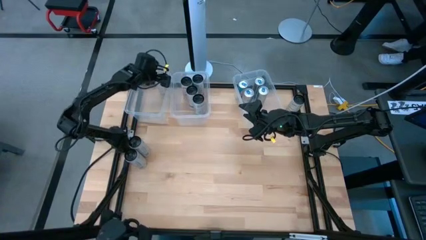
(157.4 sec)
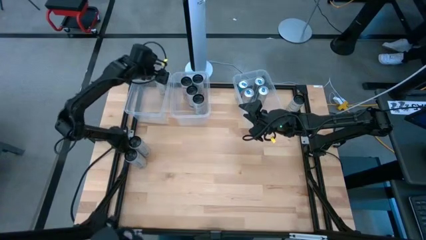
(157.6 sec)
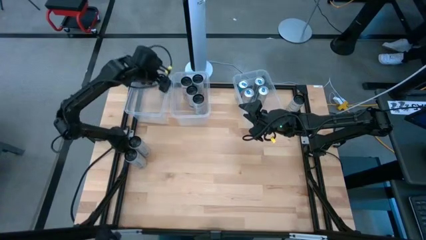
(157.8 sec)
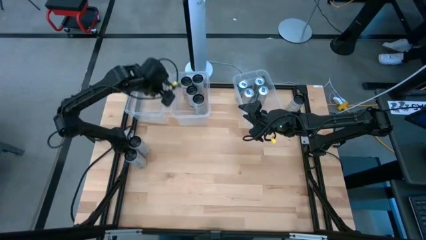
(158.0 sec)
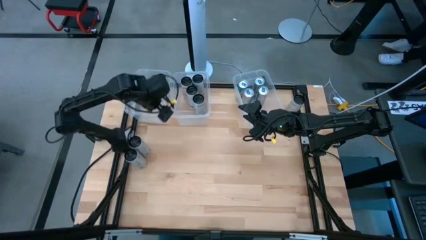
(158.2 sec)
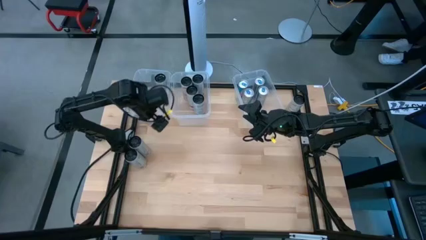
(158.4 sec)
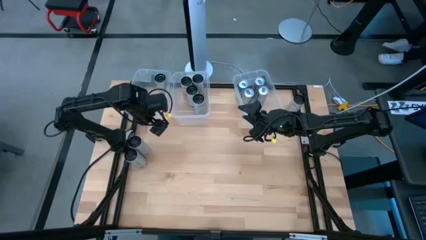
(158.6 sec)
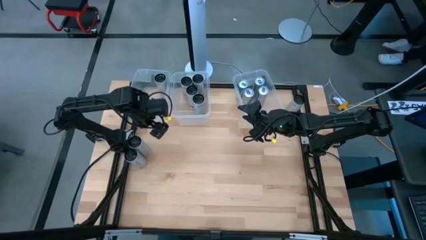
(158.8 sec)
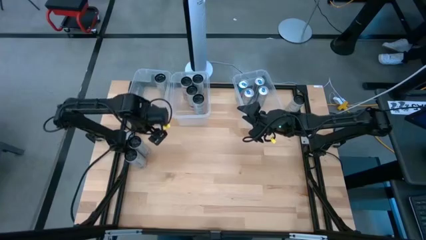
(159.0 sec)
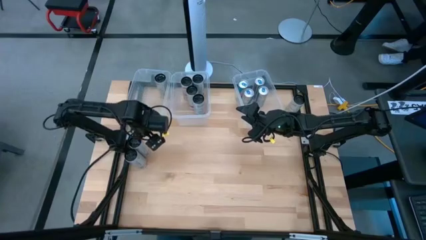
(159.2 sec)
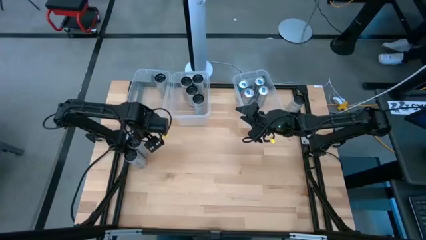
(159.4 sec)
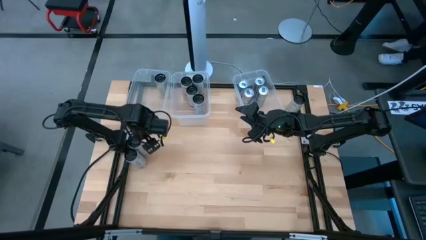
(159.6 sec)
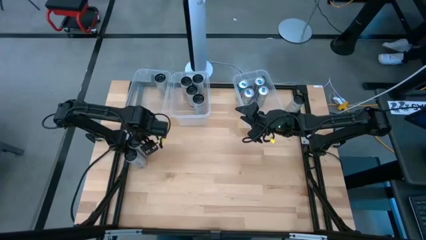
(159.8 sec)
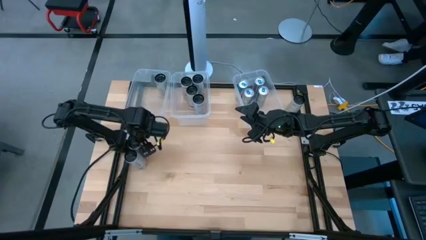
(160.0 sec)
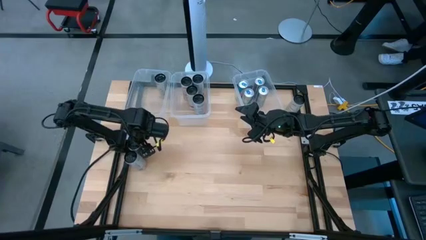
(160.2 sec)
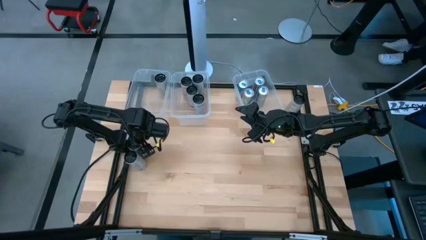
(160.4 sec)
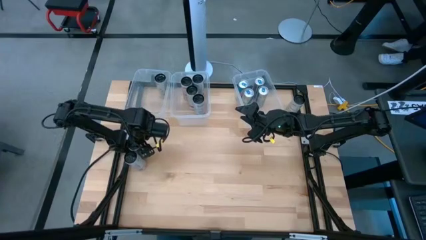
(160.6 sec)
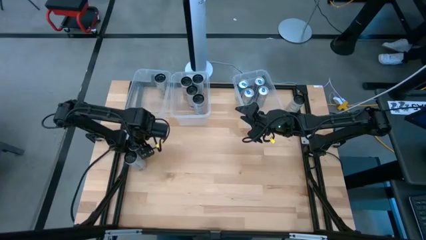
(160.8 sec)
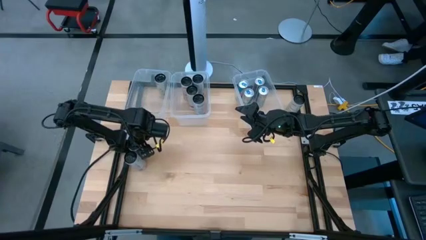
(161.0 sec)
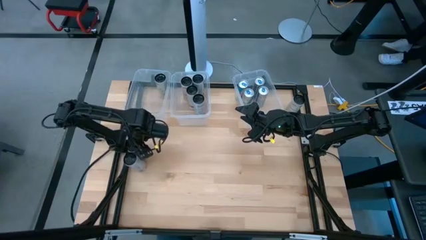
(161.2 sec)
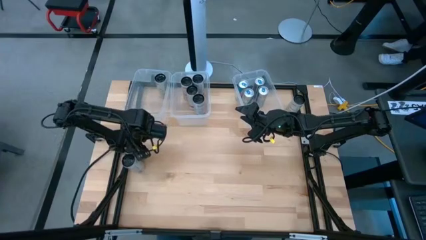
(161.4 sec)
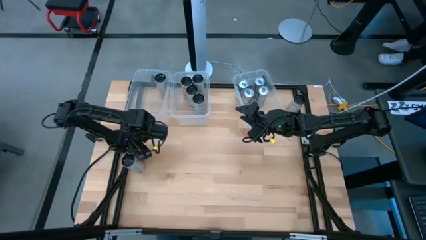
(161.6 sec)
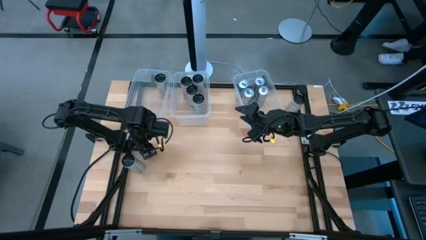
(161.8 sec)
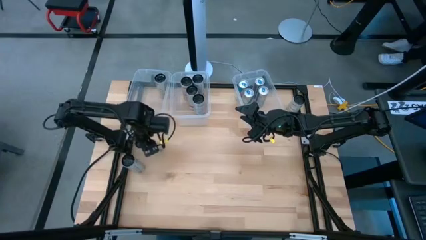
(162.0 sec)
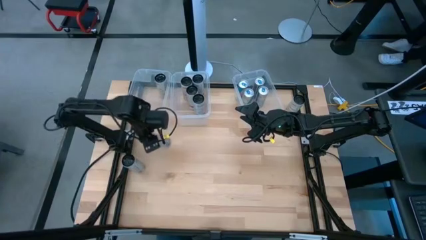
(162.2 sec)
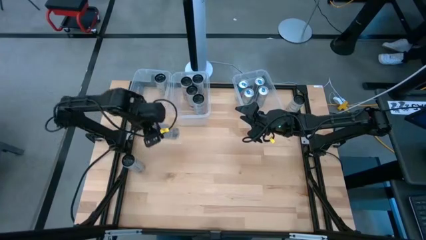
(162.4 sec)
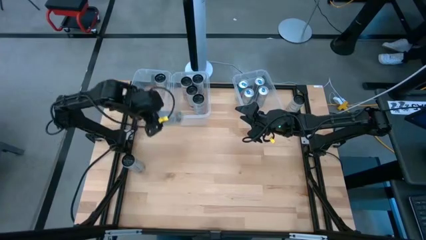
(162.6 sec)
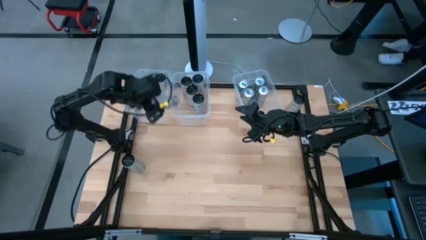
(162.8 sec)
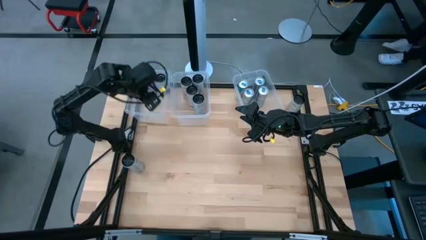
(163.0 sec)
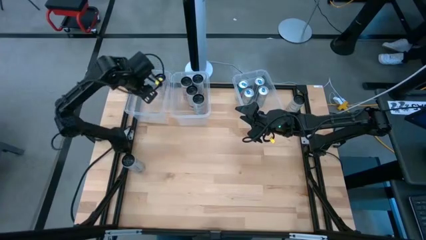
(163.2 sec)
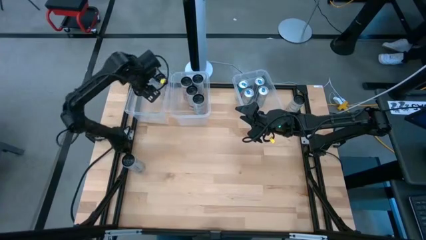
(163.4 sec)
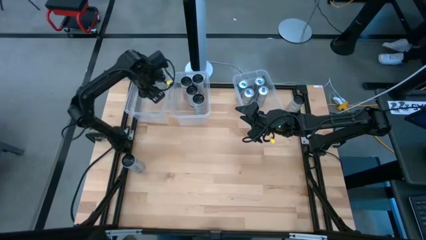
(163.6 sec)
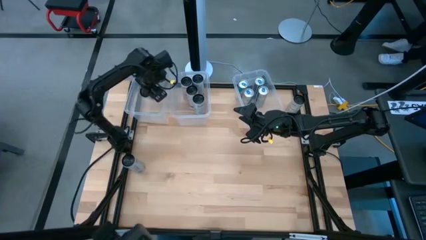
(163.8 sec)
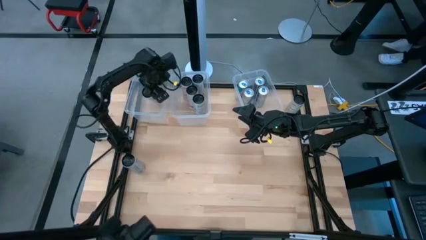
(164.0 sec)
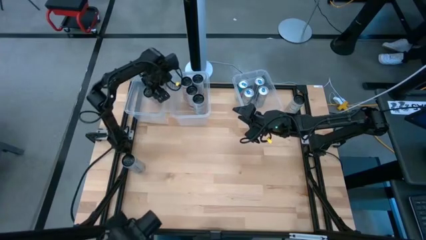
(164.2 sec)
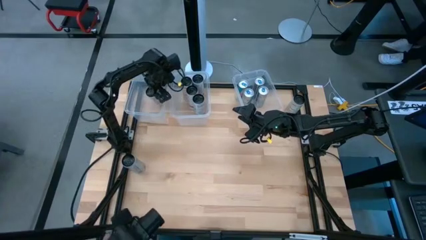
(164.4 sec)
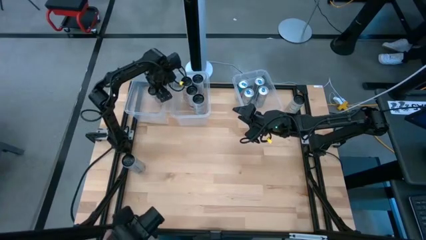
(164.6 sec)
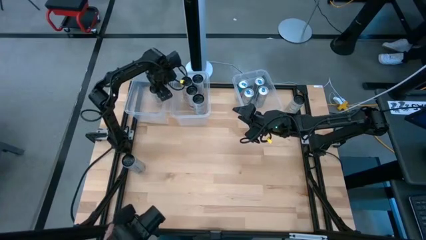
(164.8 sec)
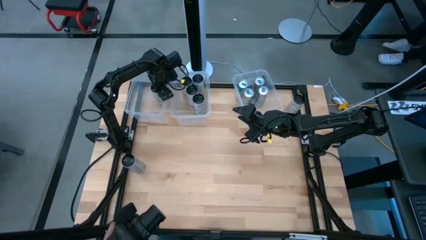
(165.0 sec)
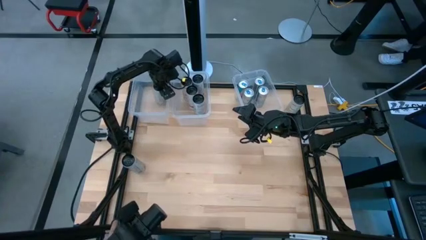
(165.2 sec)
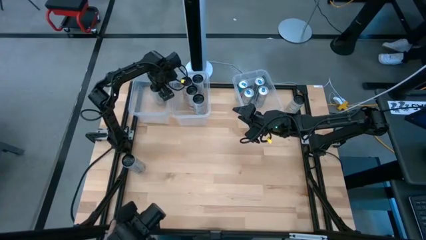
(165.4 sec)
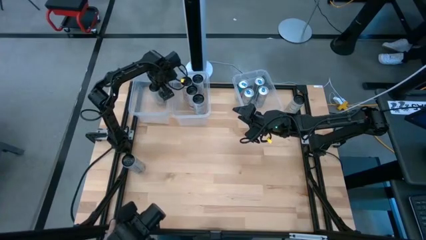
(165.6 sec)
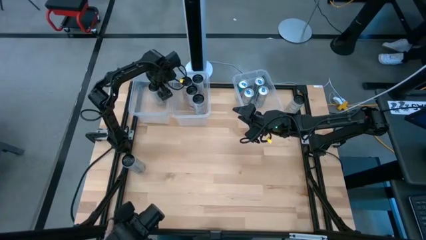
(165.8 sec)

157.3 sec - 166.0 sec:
Task: Sort soda cans
Put the top left white-yellow soda can into the top left transparent bin

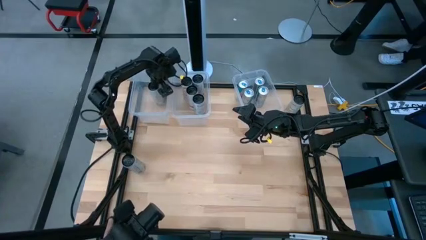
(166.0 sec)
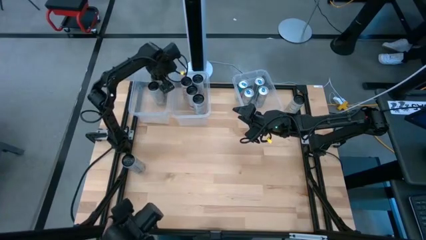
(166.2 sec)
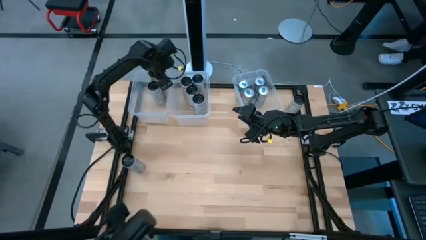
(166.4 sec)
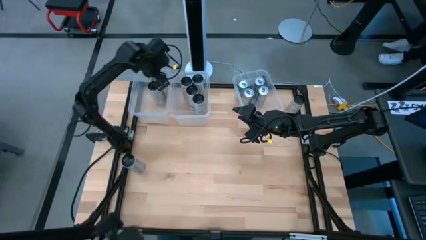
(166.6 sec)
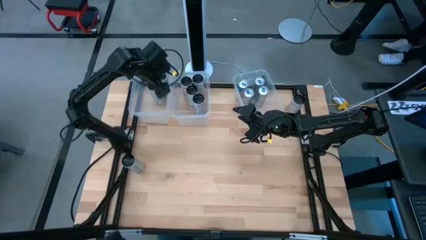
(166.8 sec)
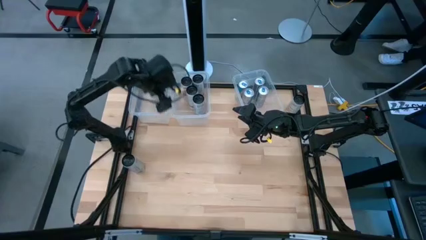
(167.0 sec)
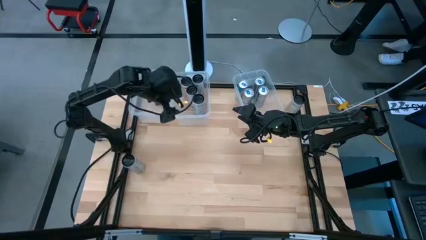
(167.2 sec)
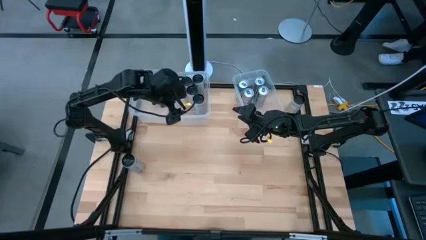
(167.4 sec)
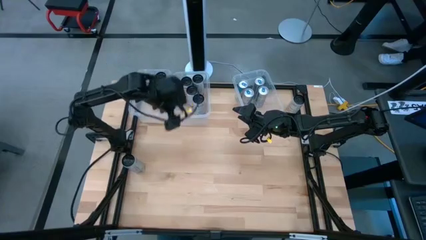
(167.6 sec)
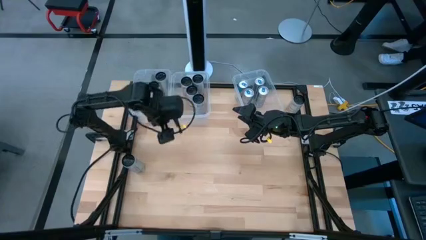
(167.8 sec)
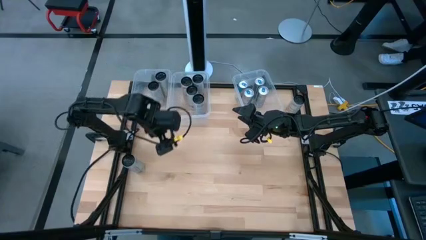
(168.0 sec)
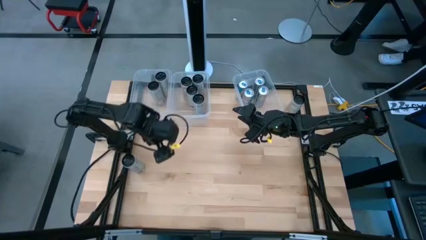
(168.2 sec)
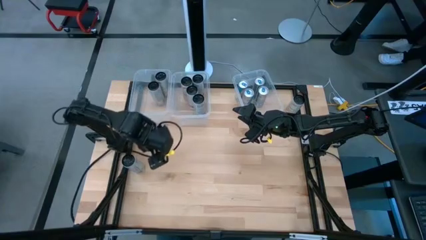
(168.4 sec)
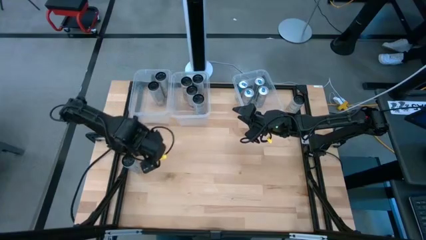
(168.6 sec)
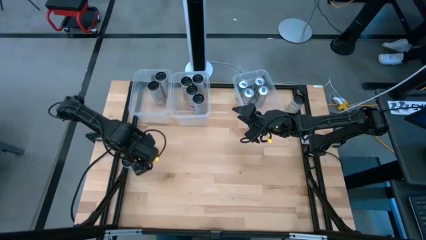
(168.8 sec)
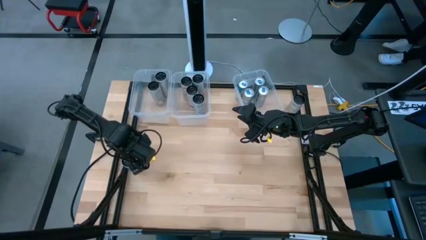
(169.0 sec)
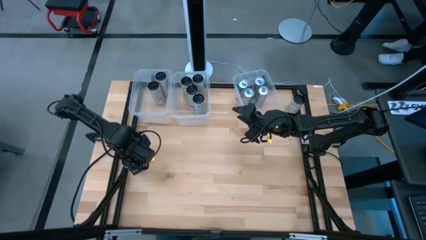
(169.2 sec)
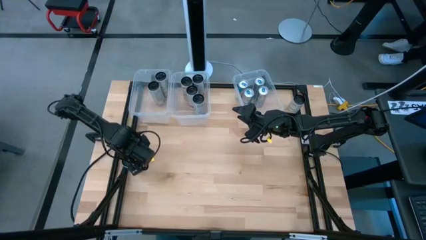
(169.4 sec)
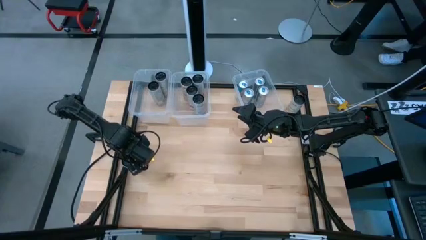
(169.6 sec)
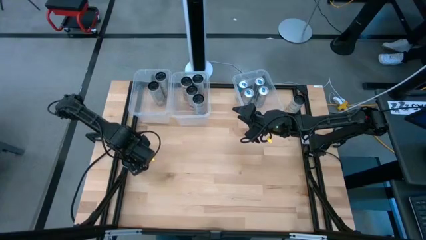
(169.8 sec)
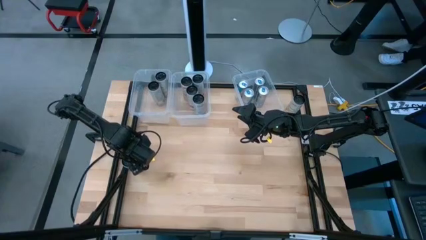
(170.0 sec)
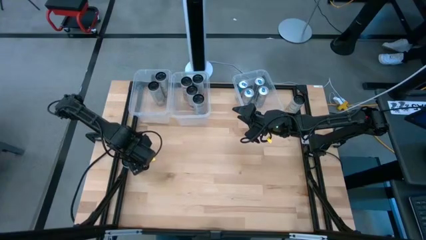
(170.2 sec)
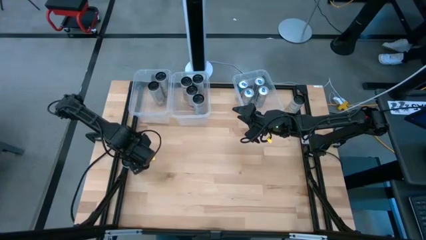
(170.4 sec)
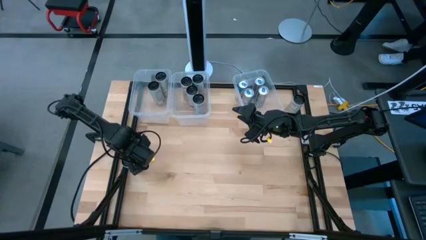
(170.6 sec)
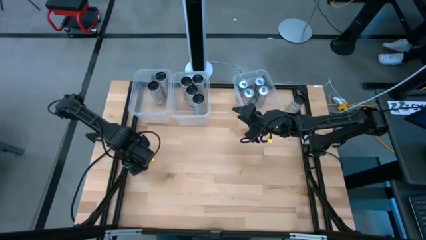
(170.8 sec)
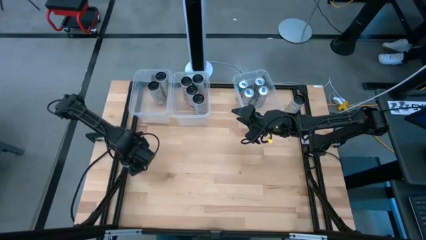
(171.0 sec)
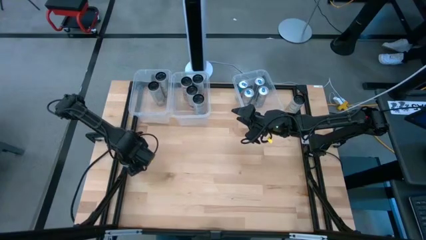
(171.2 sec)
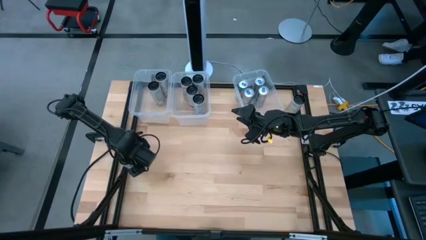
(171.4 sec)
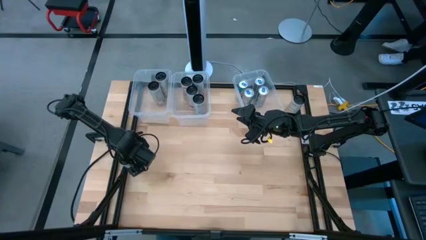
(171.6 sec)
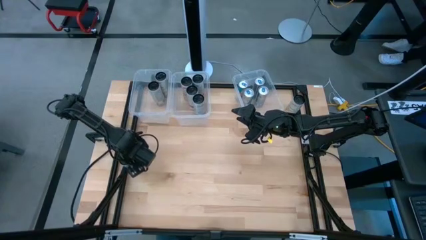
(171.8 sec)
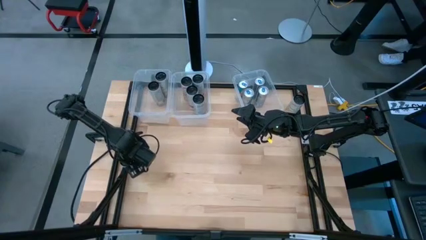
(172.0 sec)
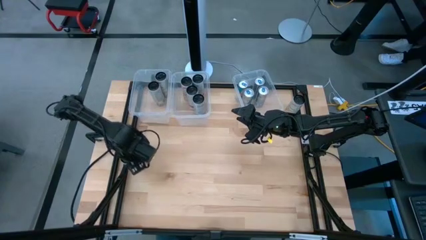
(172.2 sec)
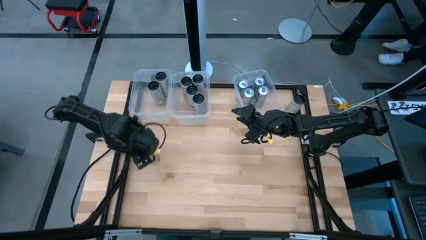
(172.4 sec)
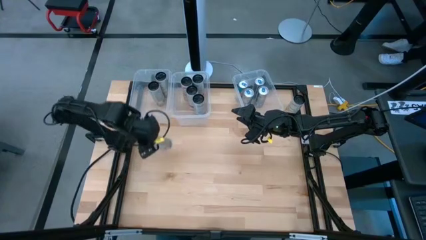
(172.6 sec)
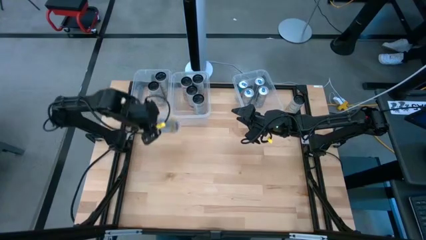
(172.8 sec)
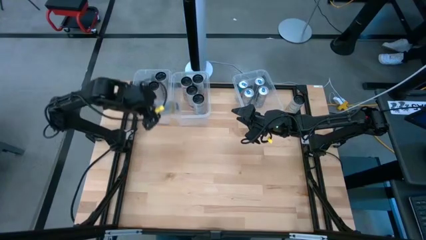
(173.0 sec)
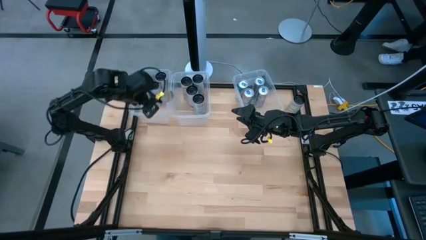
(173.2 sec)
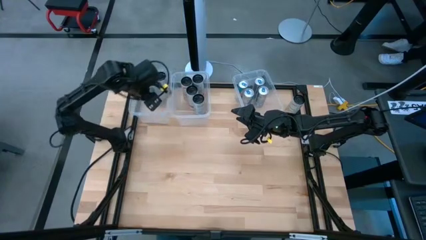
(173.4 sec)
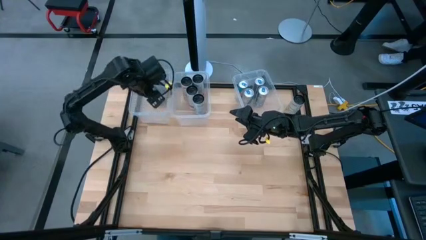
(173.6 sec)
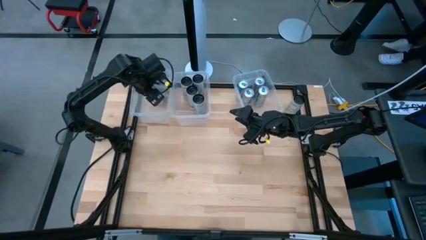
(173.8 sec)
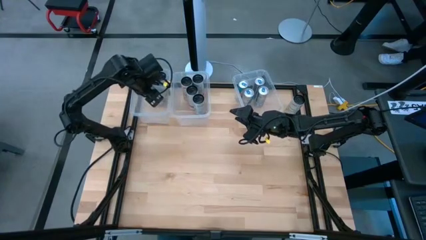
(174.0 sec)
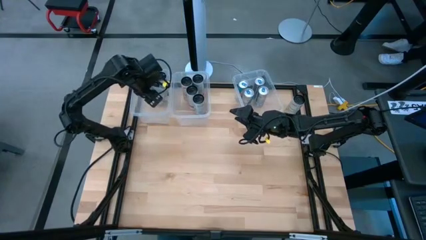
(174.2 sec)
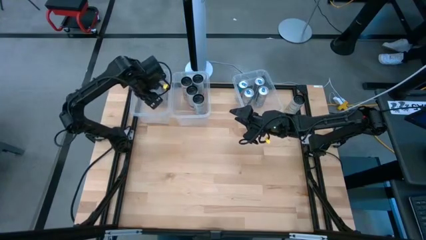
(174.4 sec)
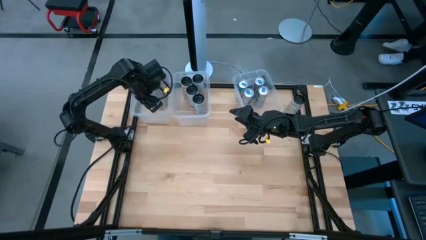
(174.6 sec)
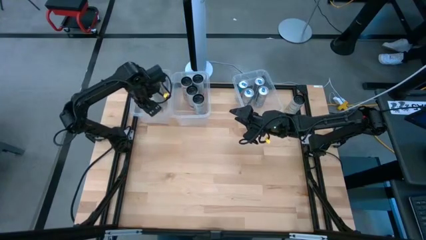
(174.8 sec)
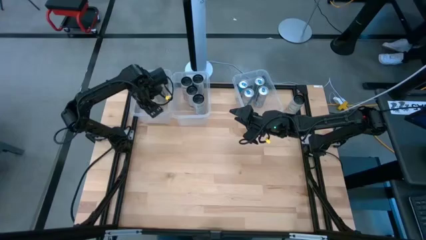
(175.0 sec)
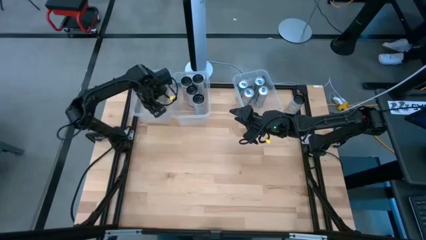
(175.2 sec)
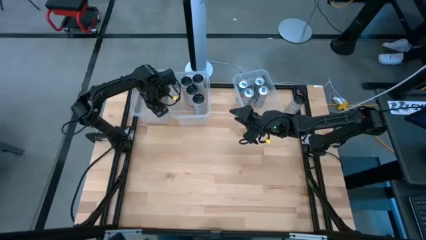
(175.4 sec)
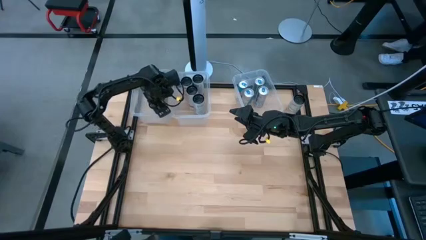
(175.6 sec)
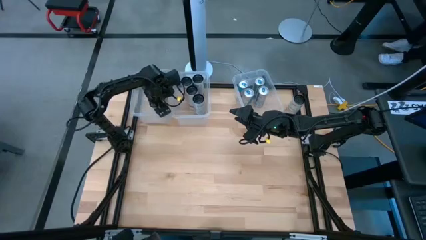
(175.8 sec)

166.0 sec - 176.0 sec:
Put the bottom white-yellow soda can into the top left transparent bin
